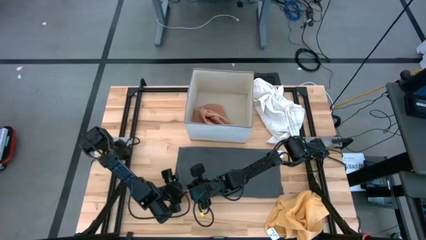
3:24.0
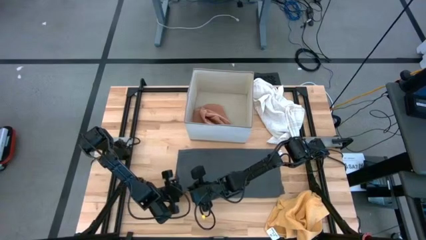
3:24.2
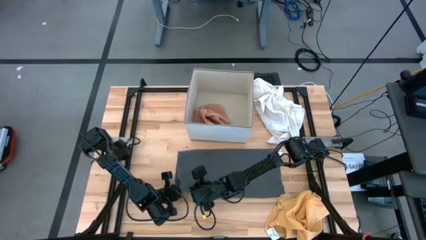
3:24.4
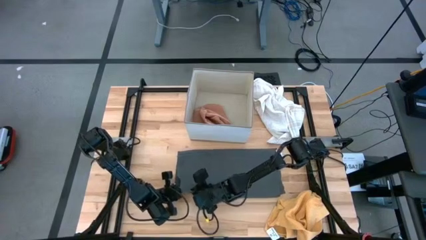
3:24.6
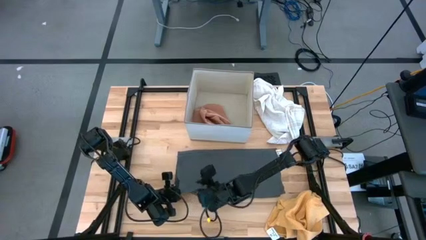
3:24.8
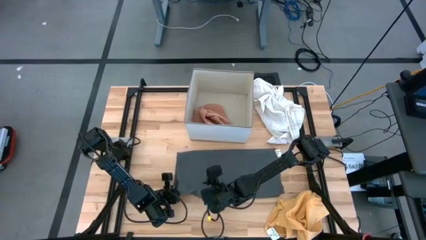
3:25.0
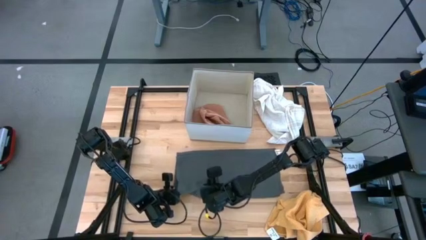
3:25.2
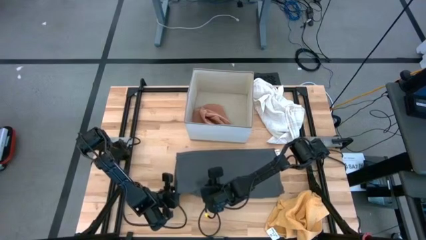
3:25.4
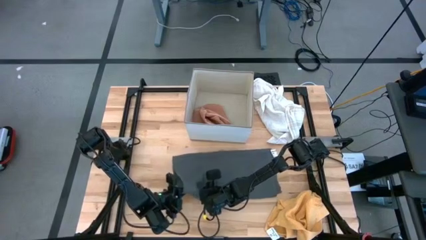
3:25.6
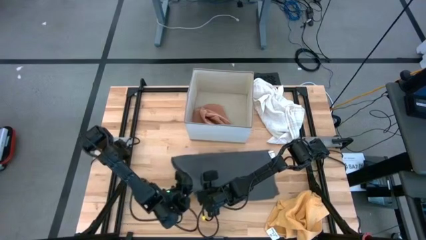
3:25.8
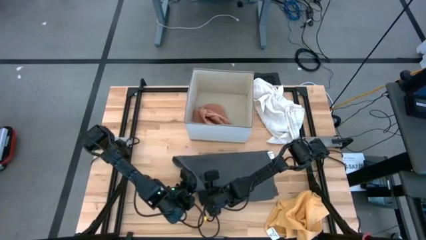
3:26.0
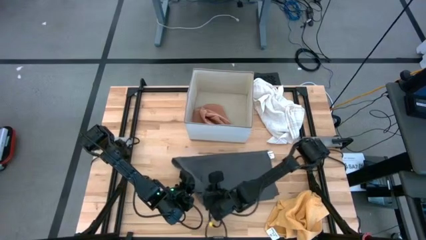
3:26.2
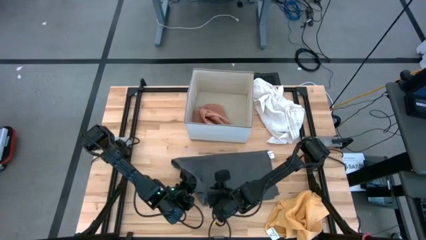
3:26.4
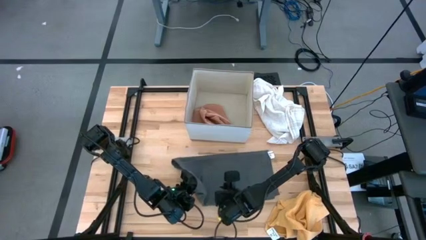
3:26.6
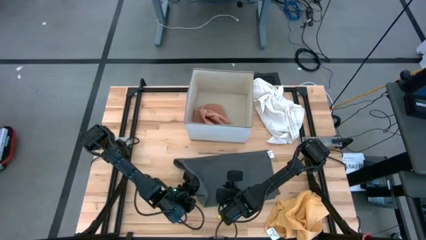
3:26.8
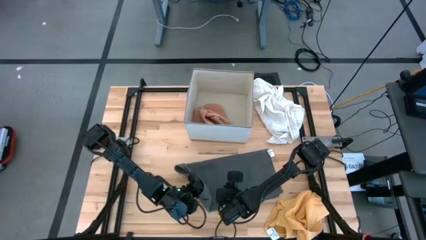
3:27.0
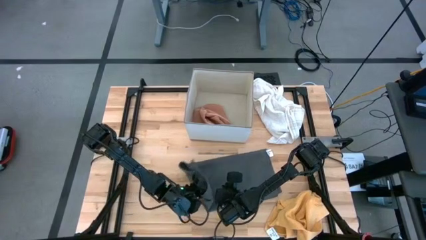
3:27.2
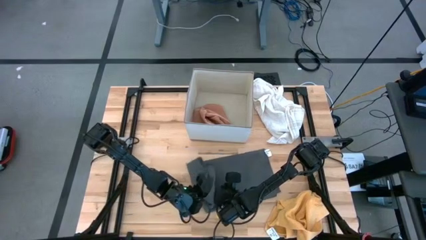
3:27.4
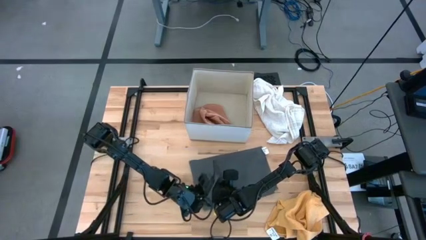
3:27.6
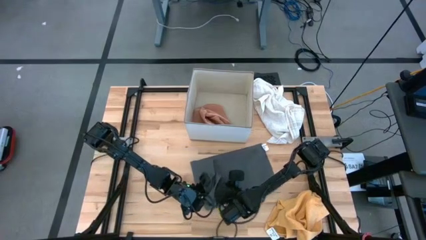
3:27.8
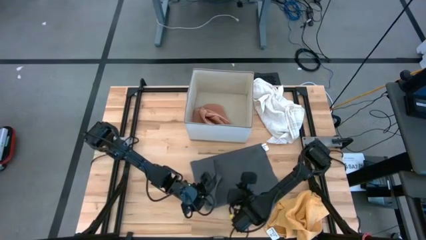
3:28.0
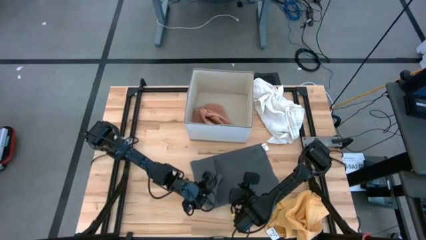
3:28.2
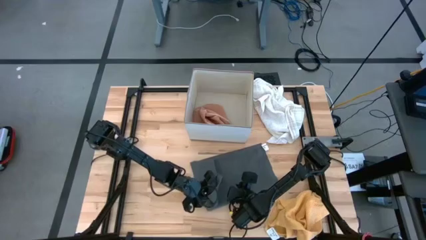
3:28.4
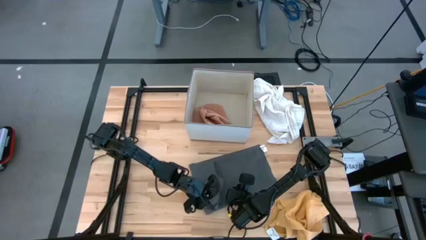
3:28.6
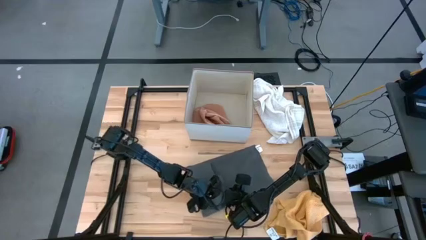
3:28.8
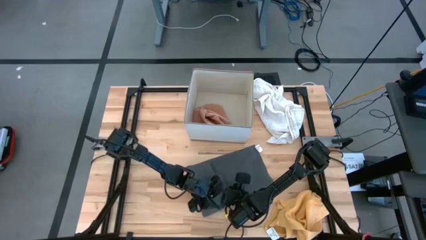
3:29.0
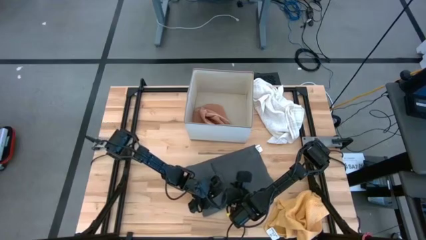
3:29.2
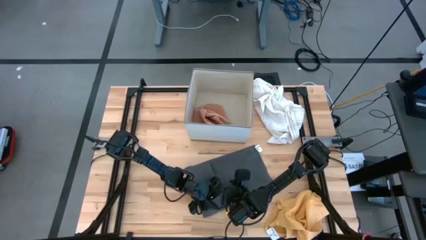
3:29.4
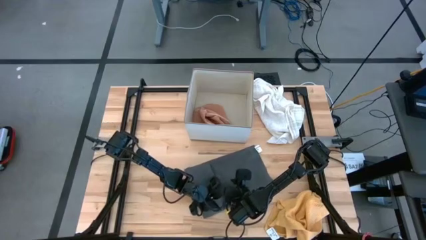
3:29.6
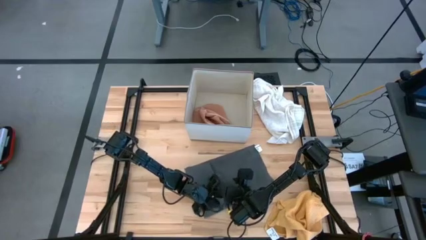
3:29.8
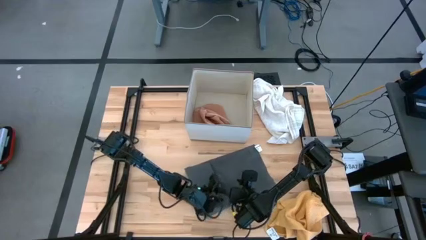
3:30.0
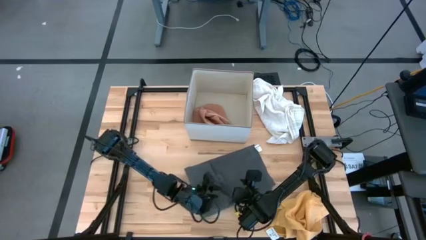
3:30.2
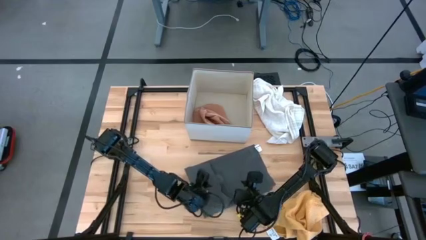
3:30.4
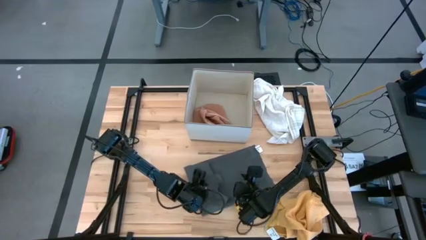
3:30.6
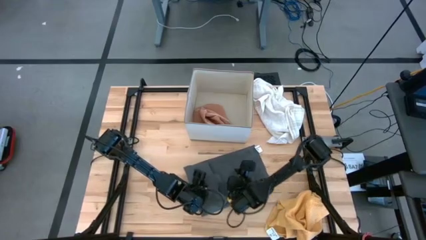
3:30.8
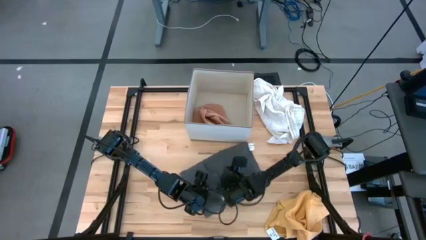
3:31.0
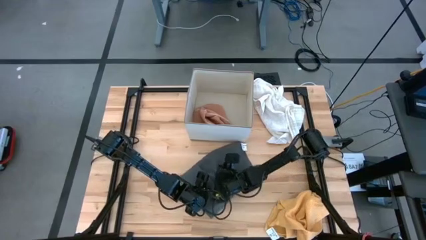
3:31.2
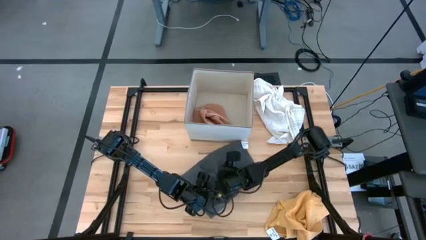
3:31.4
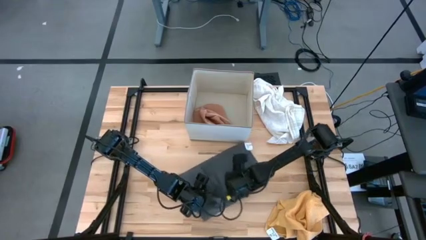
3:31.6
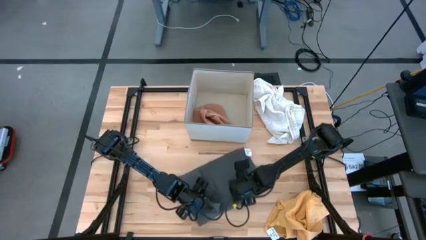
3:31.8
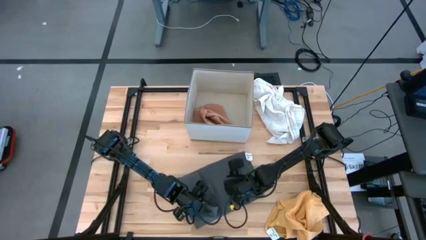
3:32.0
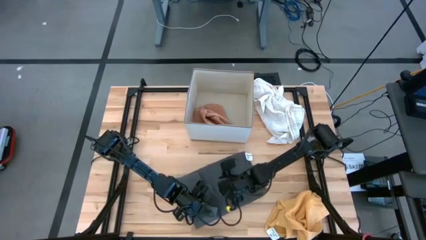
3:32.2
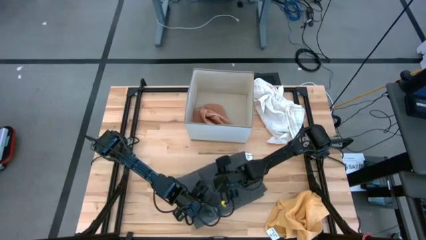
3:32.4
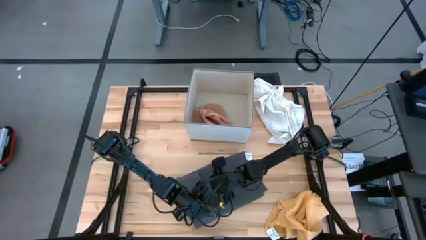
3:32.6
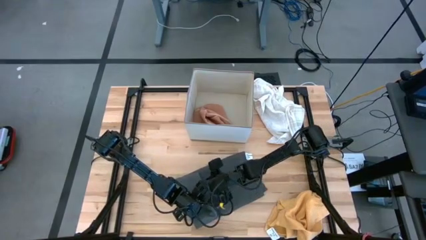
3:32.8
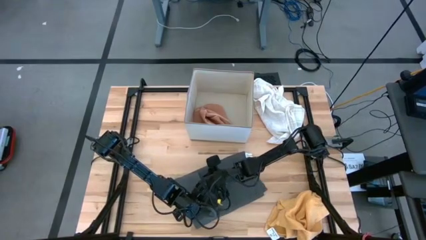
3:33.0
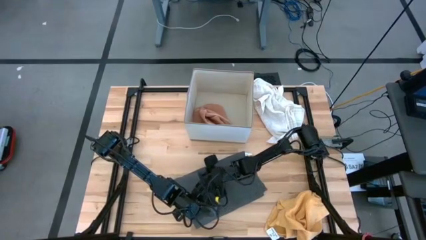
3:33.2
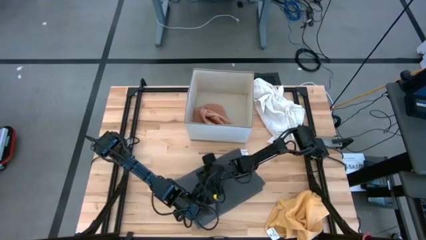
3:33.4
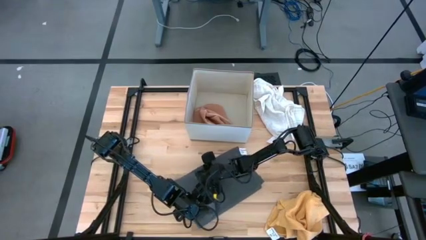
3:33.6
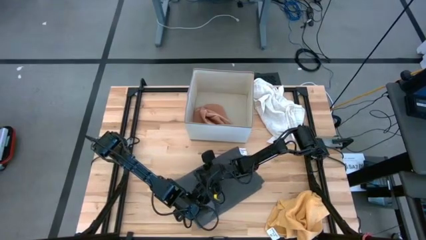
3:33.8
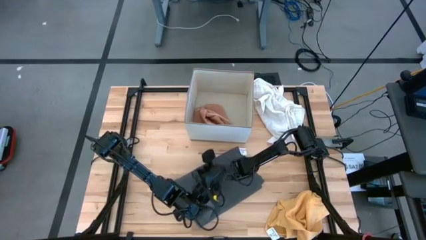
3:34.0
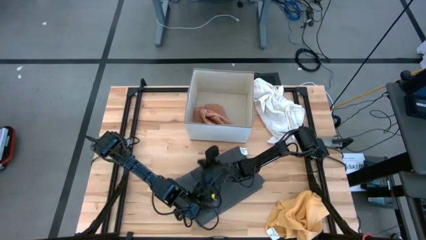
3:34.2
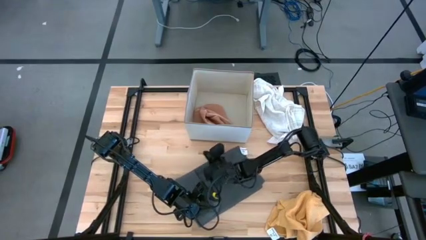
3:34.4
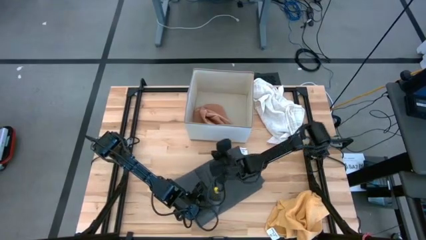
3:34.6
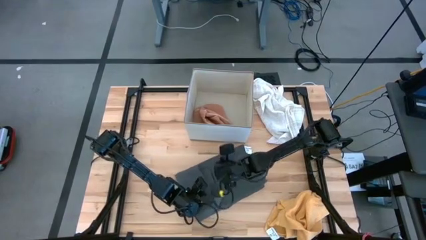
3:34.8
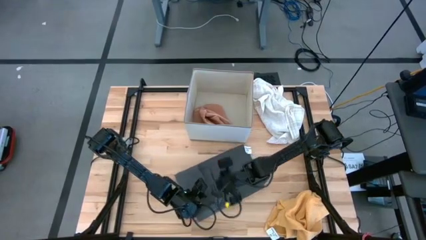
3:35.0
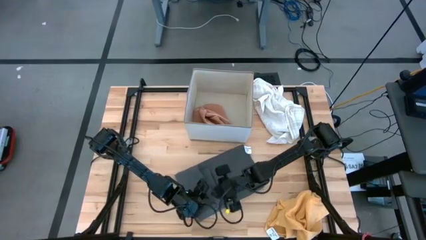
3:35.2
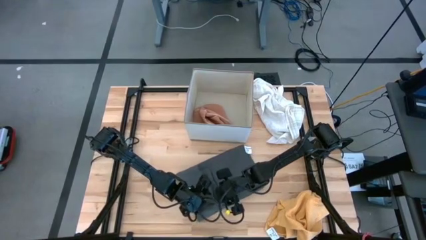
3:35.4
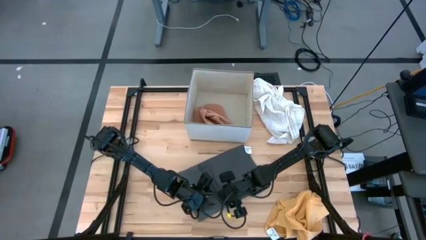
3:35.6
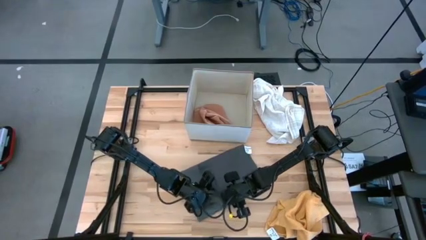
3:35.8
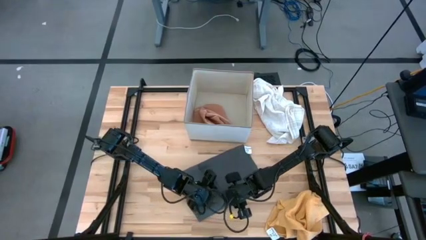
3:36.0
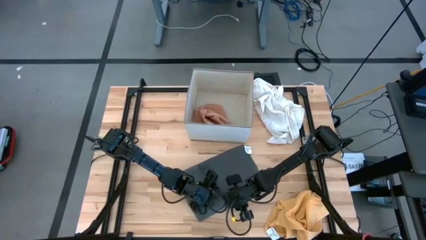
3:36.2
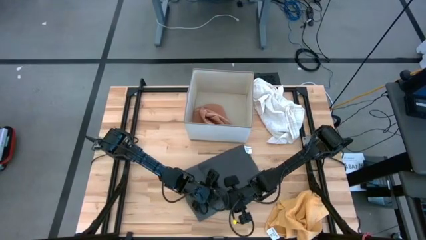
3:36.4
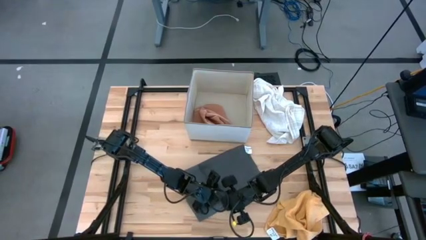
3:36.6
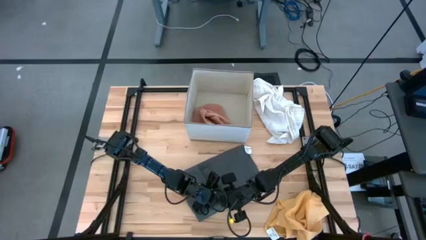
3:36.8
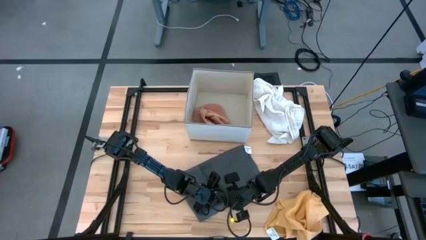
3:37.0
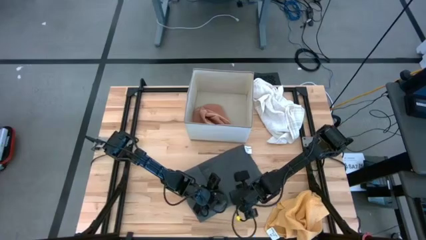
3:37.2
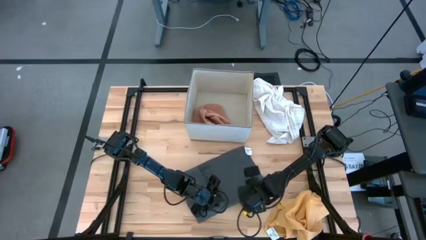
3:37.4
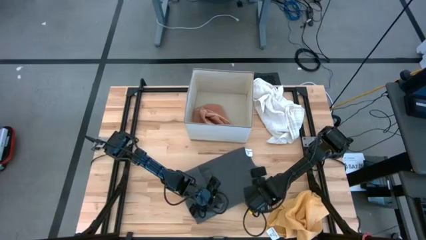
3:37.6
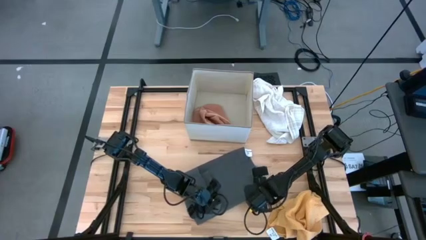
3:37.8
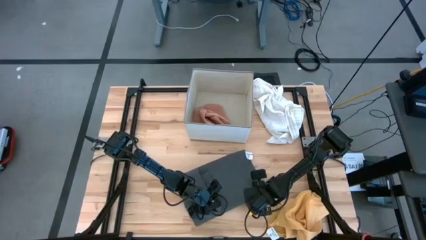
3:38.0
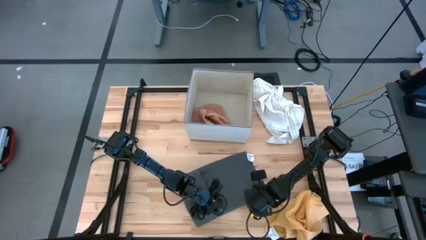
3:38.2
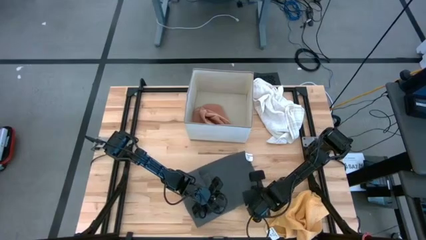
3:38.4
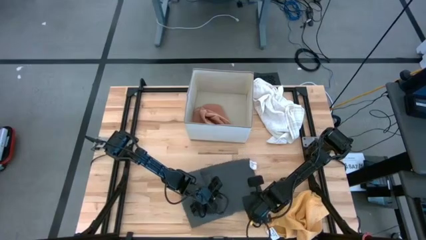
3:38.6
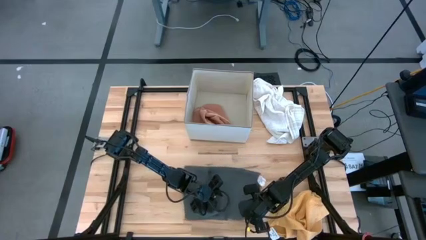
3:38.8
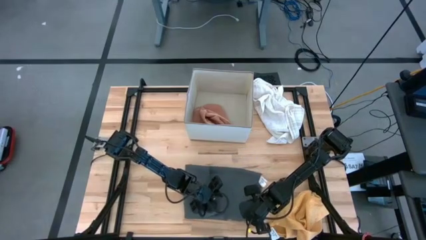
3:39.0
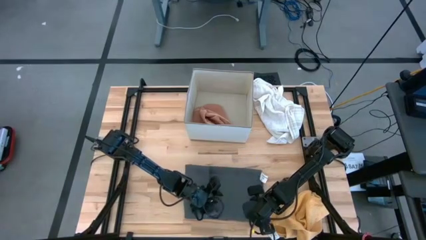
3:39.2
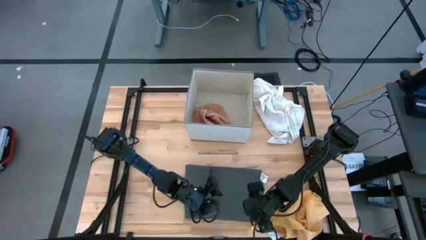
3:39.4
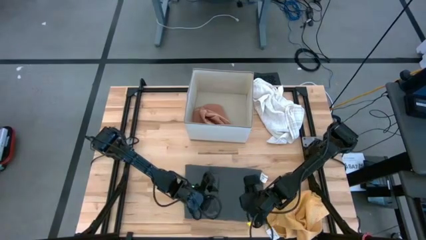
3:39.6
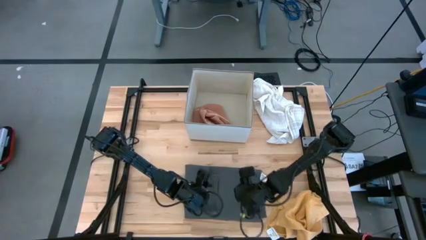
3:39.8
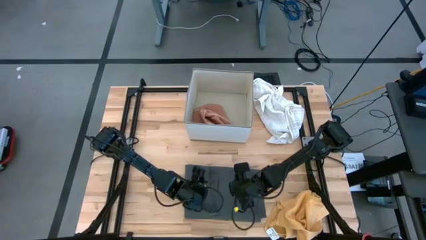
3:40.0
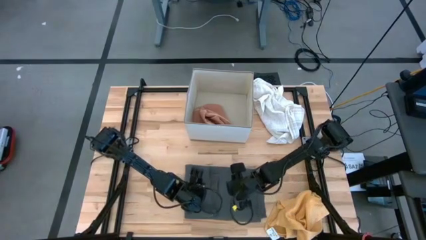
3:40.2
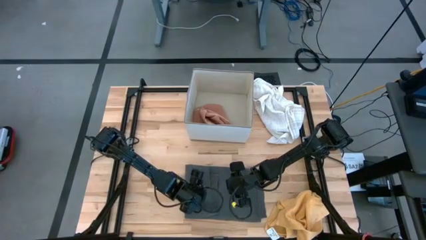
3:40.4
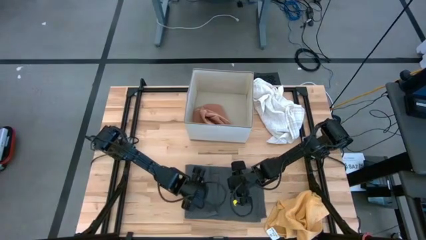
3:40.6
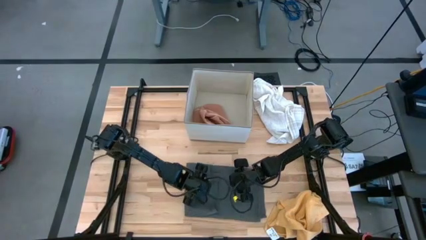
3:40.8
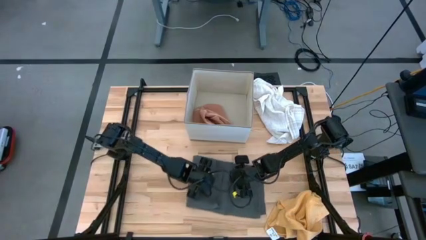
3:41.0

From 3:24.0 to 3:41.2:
Task: Fold towel
Fold the gray towel
